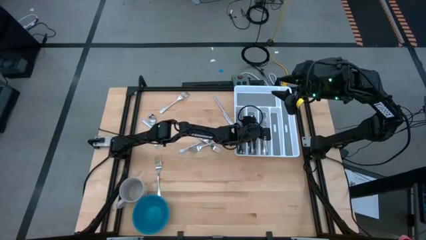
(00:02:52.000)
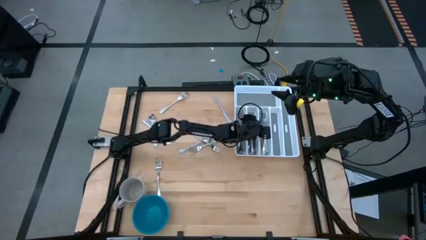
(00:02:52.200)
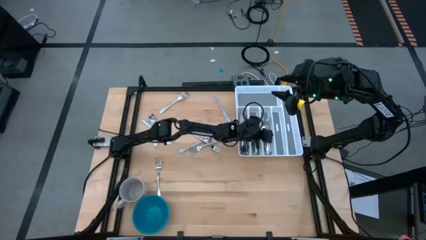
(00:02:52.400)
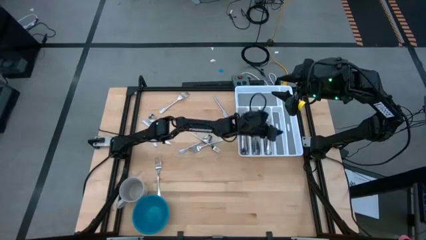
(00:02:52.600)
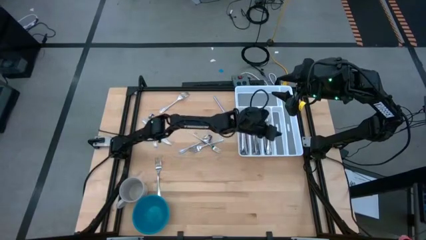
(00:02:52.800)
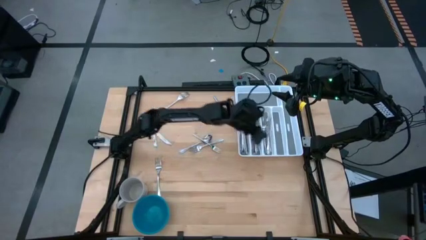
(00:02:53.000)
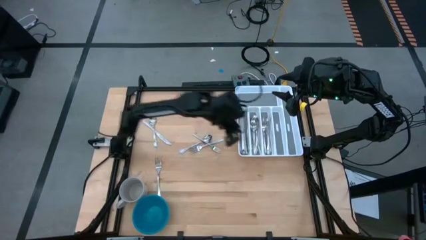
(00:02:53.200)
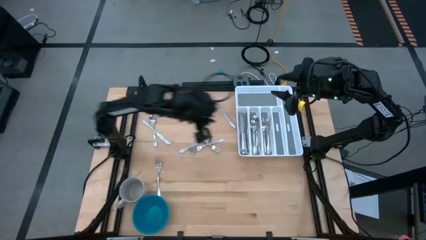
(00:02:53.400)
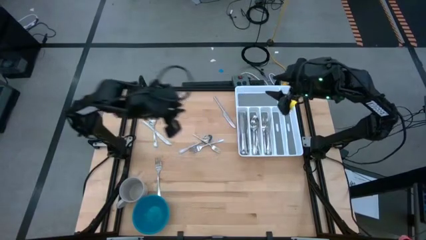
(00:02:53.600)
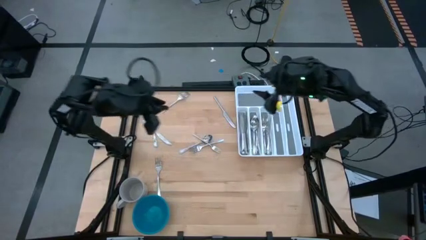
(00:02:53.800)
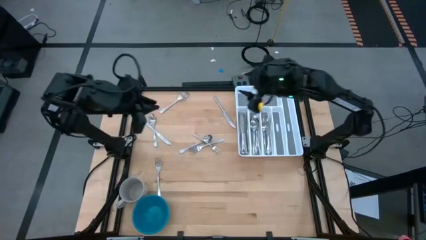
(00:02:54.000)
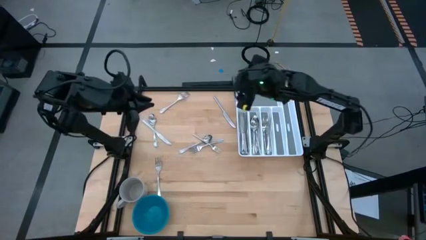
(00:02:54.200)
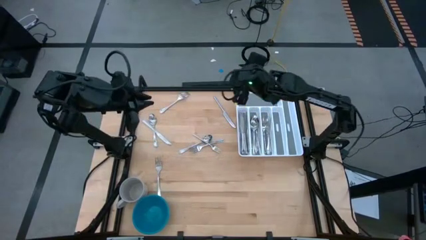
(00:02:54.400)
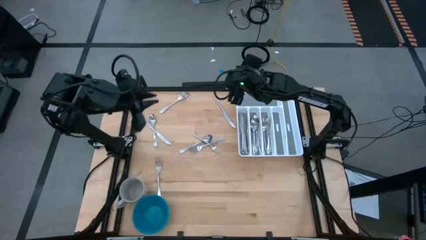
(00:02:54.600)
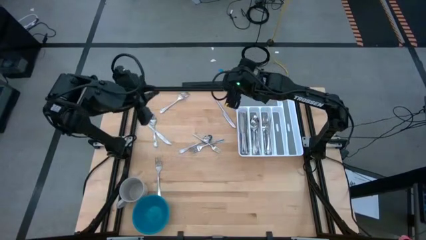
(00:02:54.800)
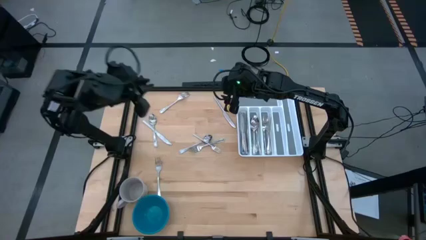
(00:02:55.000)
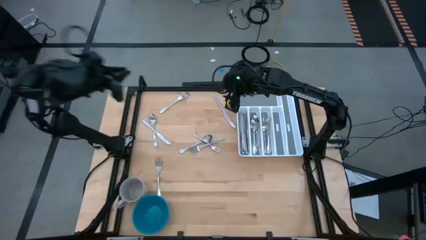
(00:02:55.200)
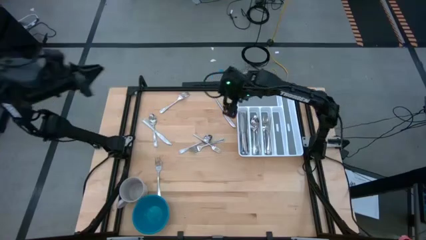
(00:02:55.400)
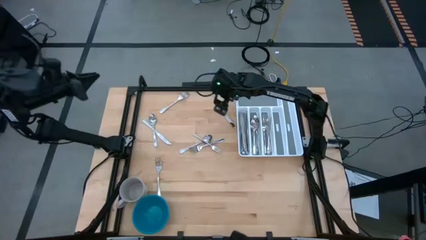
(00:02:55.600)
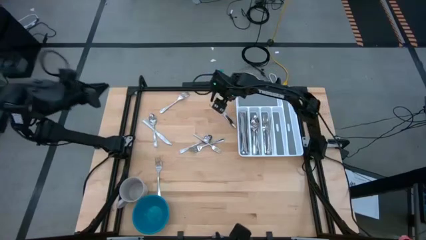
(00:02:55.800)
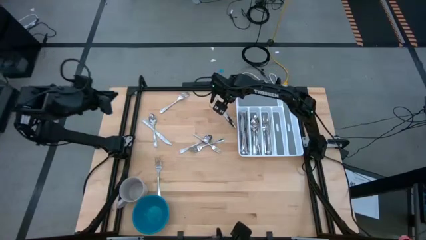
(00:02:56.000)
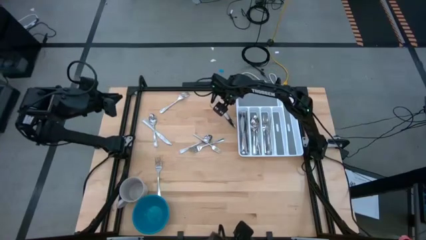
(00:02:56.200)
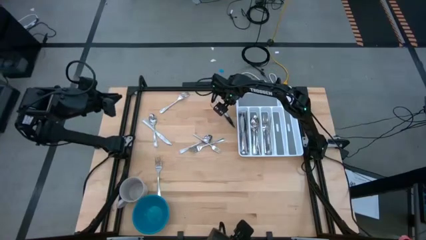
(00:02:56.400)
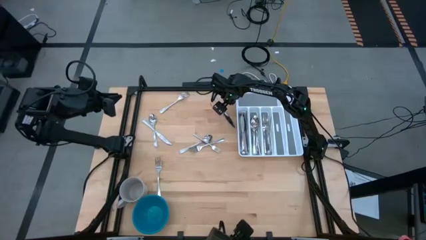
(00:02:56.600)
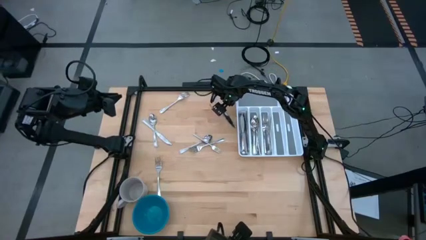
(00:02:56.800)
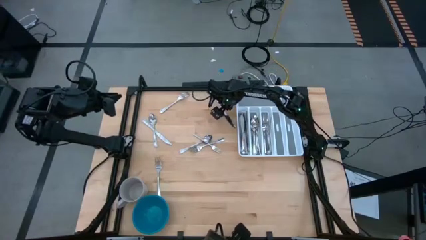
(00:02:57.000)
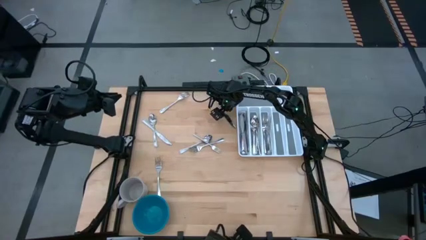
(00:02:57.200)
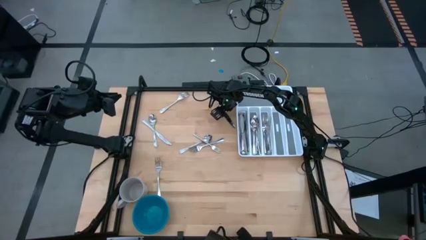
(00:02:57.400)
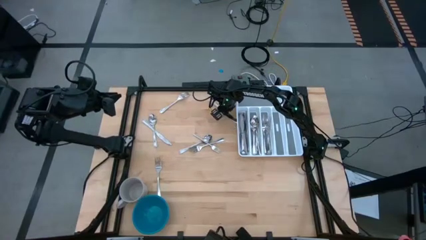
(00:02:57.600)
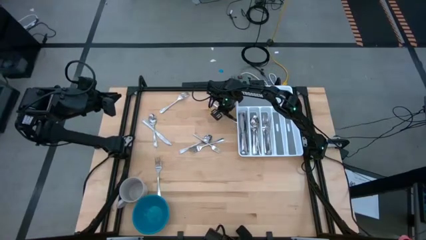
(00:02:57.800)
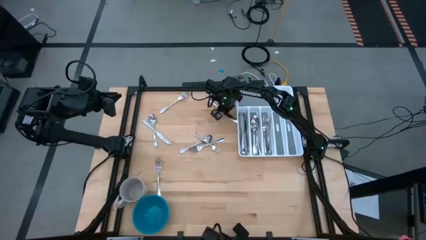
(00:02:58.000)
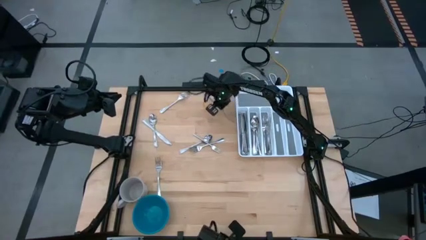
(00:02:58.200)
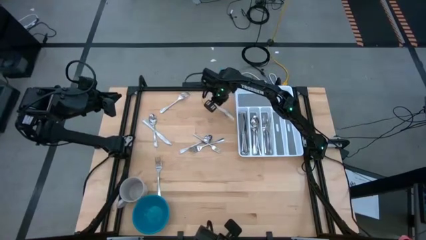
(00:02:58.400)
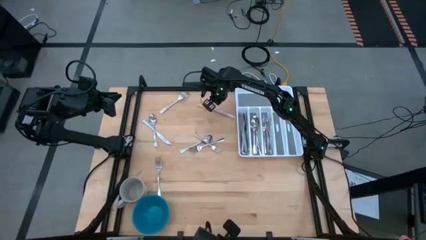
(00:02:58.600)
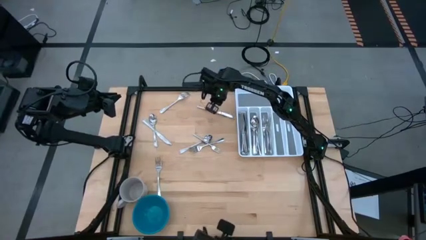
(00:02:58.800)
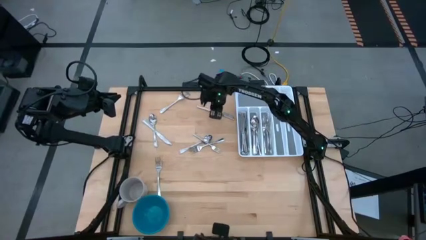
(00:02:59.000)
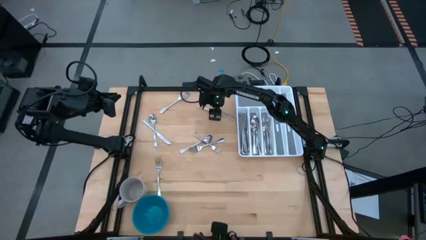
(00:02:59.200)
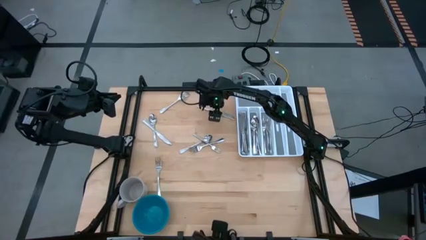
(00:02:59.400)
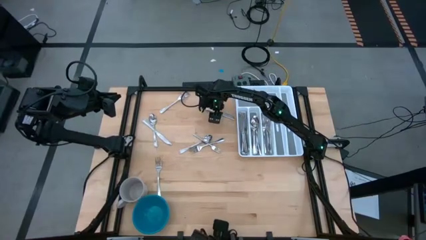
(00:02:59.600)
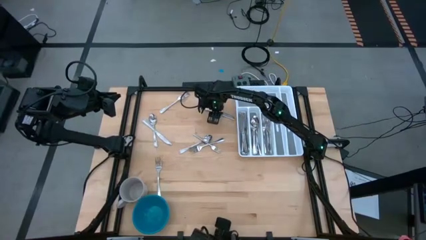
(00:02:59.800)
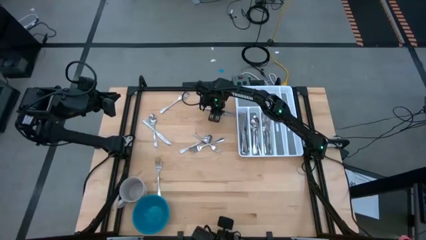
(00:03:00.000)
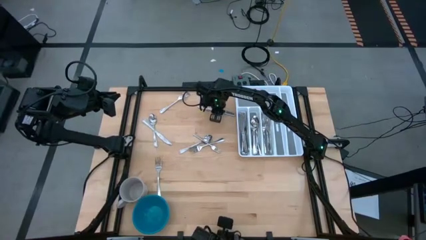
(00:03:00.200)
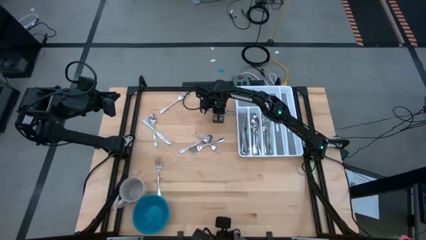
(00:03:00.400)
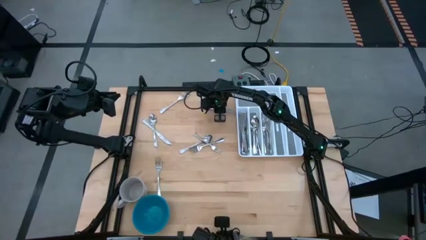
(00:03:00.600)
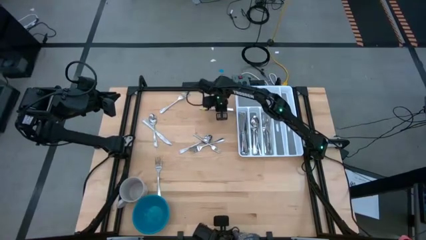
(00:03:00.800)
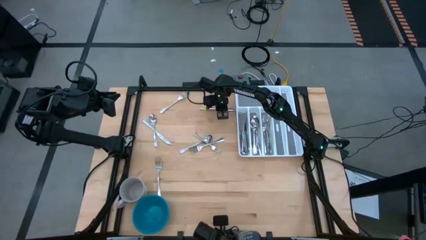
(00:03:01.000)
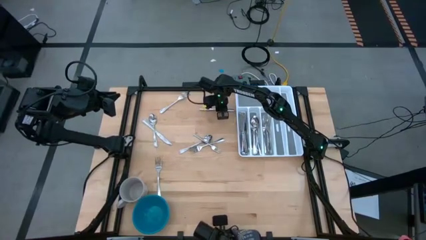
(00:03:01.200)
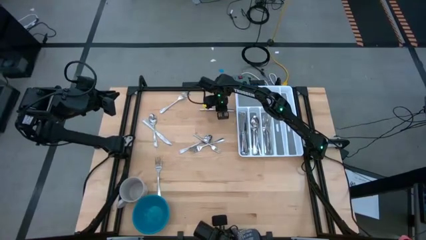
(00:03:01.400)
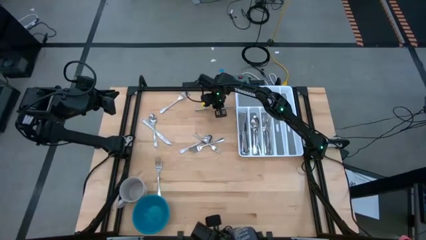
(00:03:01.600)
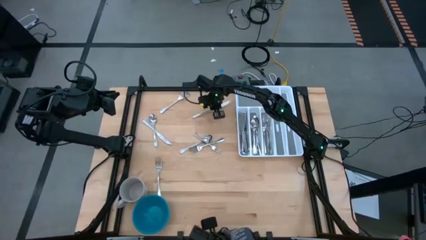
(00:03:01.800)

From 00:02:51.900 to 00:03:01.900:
Task: Sort silverware
Put the table knife into the silverware tray

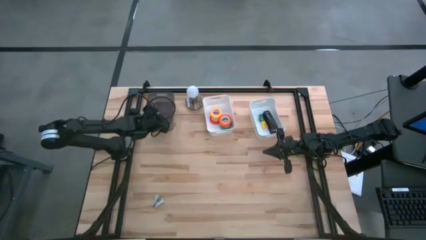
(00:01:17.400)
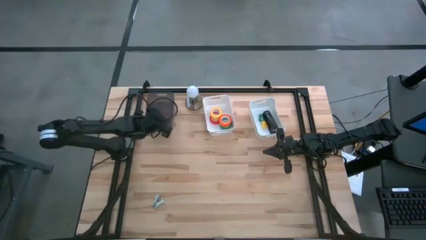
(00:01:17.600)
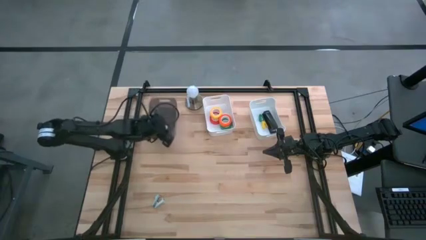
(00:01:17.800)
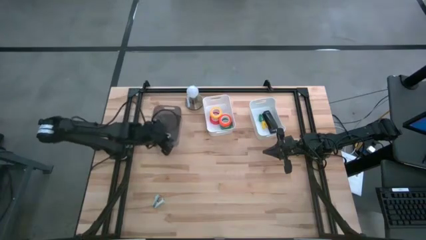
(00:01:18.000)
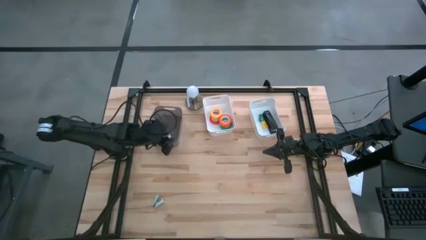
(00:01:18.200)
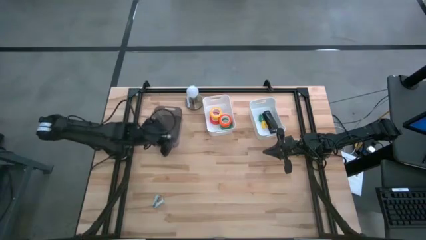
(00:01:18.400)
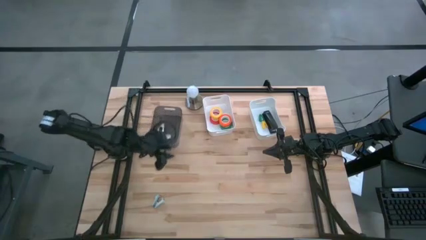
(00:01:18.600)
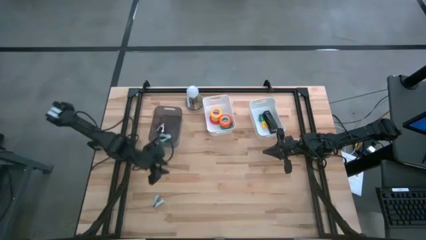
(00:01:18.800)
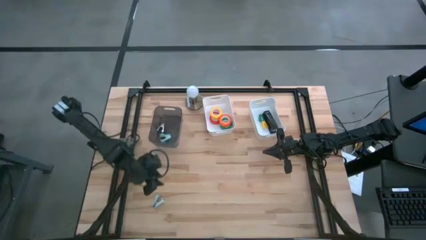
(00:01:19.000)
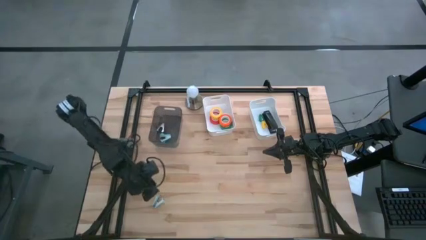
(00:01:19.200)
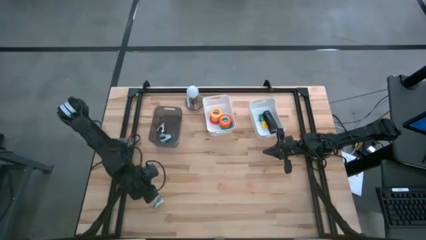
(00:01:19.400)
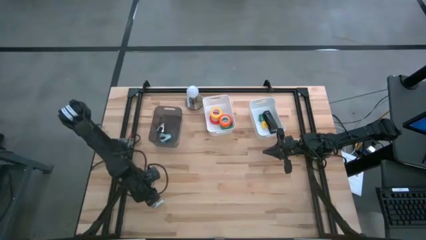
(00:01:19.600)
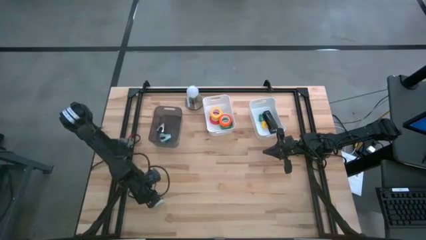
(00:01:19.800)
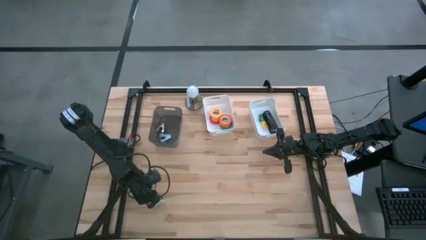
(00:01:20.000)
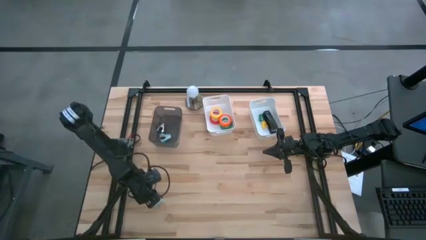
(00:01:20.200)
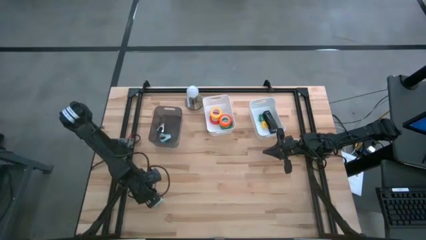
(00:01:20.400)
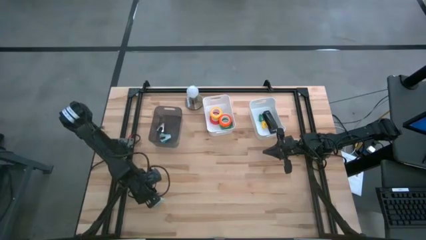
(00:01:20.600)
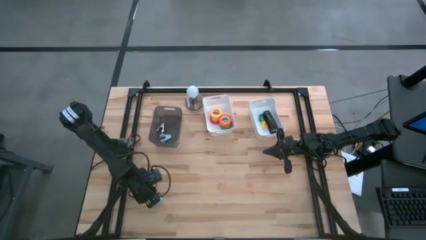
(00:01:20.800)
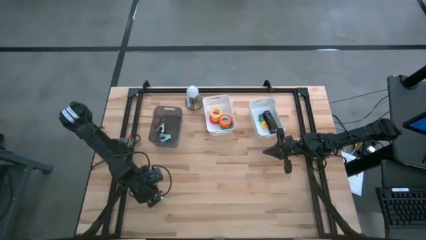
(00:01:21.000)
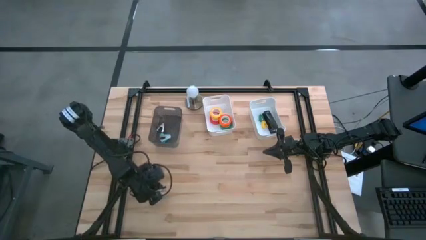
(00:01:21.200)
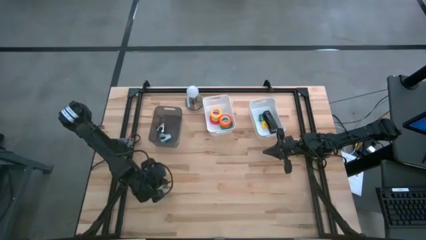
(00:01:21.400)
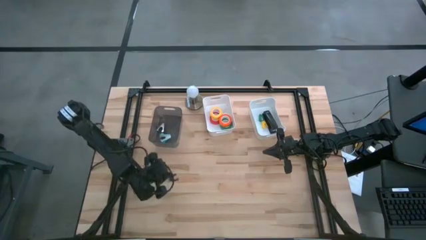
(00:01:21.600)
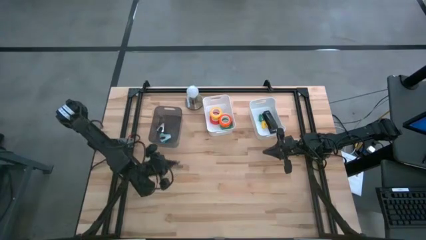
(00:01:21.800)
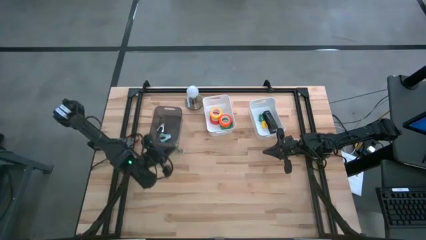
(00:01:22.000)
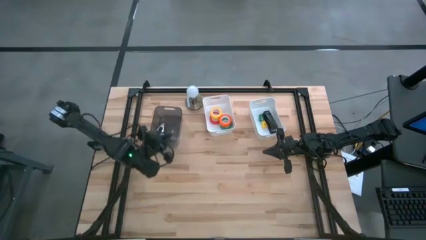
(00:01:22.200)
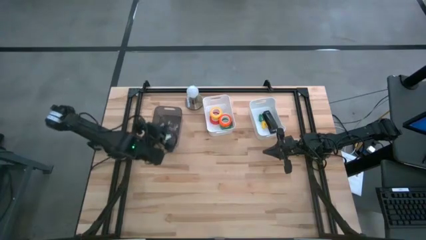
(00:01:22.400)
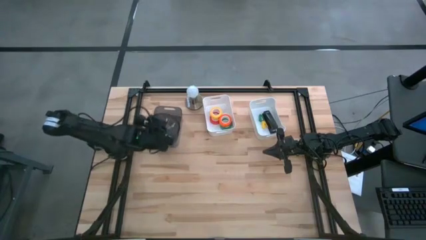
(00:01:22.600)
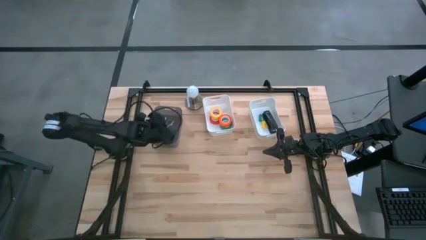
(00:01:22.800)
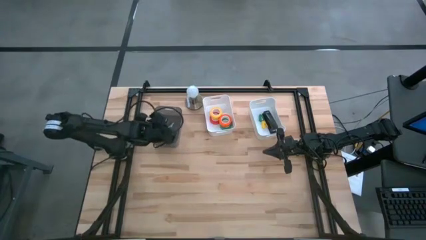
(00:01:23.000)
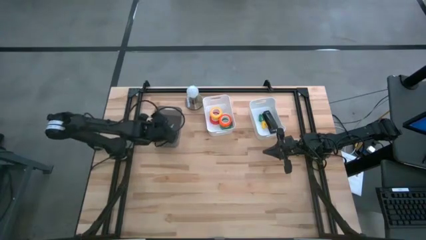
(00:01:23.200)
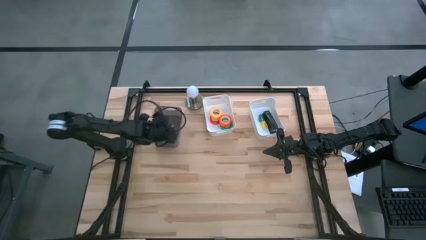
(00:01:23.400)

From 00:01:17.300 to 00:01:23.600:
Task: Pick and place Stapler, Stapler remover, tape
Put the blue staple remover into the black bin
